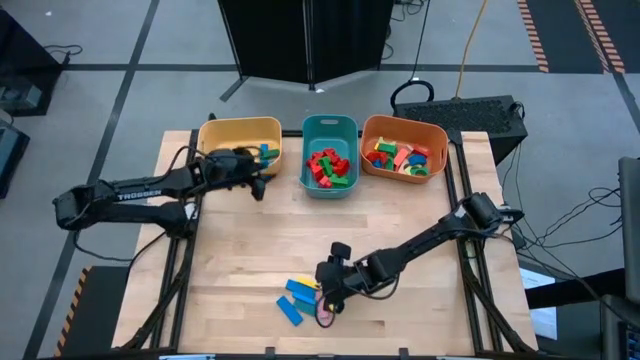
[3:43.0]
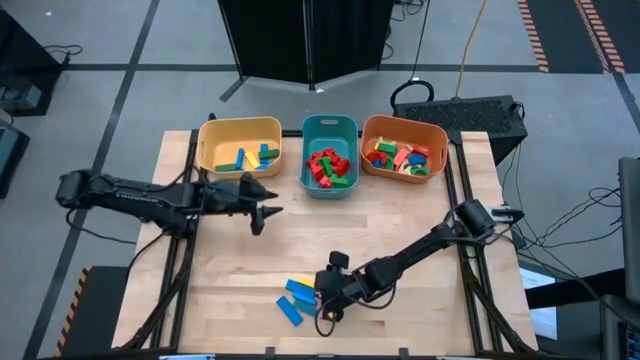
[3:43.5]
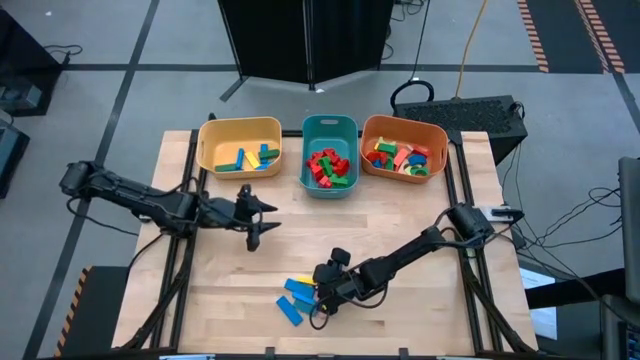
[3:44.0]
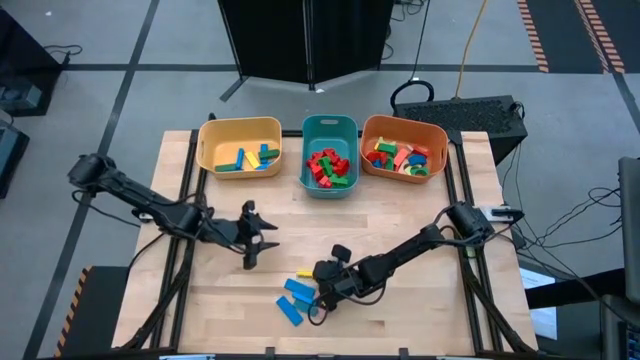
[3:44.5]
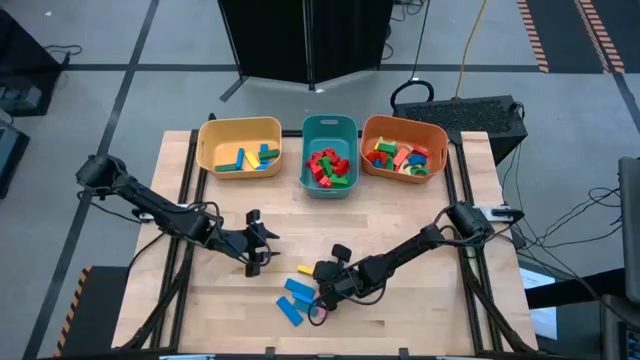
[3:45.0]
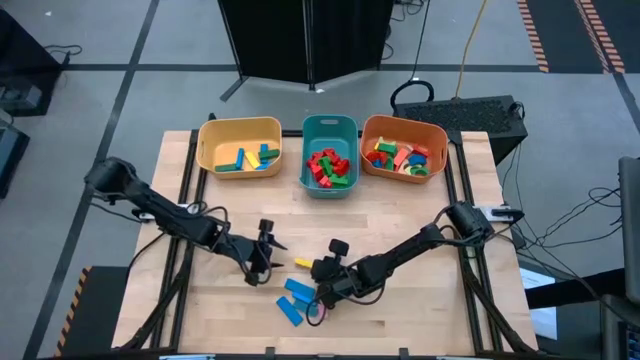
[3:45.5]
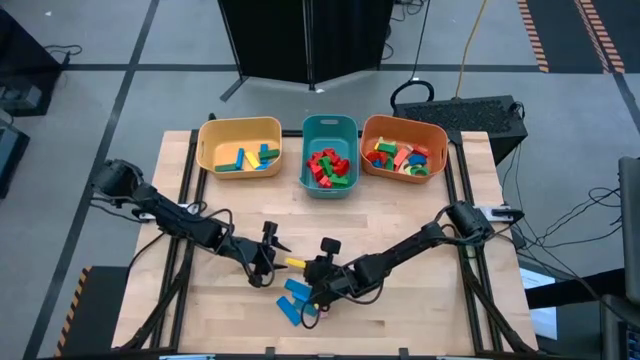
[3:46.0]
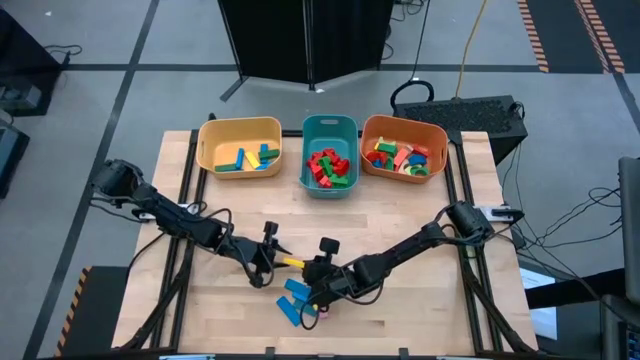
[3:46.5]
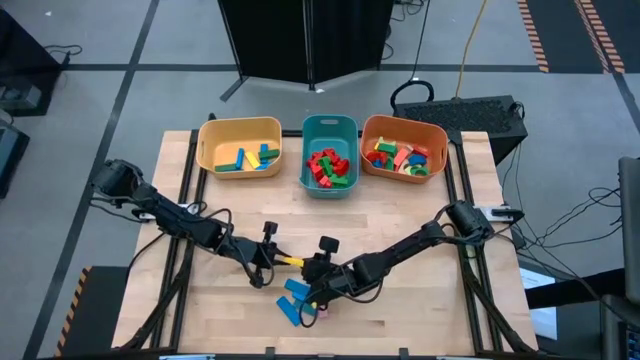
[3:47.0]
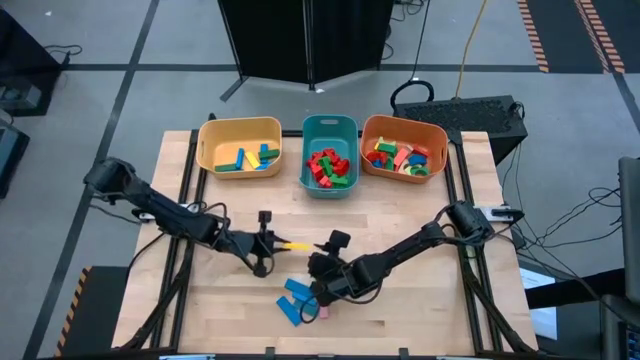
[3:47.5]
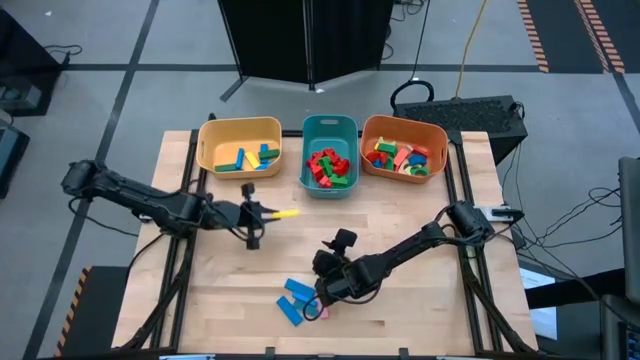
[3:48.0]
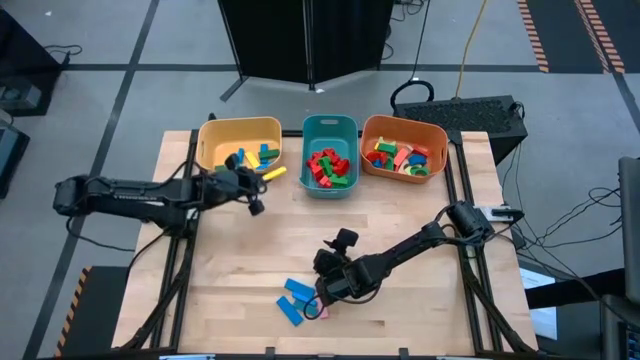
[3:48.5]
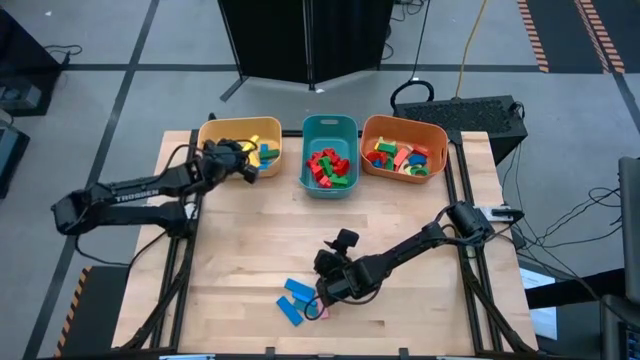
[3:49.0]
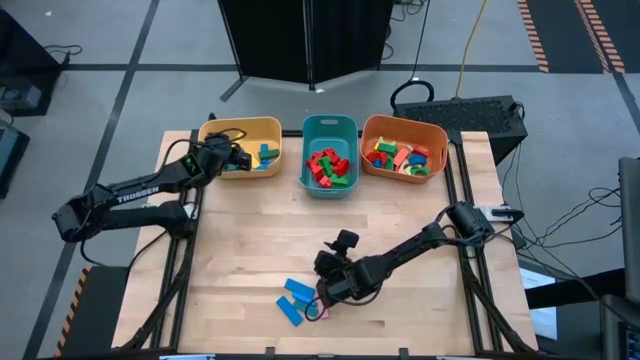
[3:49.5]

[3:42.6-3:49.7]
Task: Sort blocks by size
Put the yellow rectangle block into the yellow bin

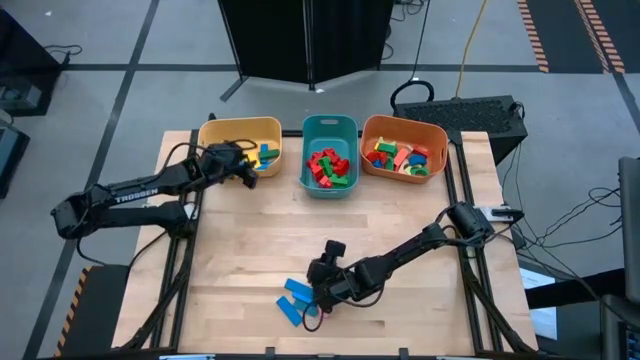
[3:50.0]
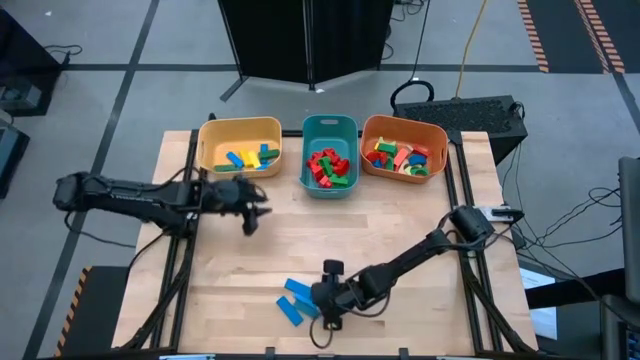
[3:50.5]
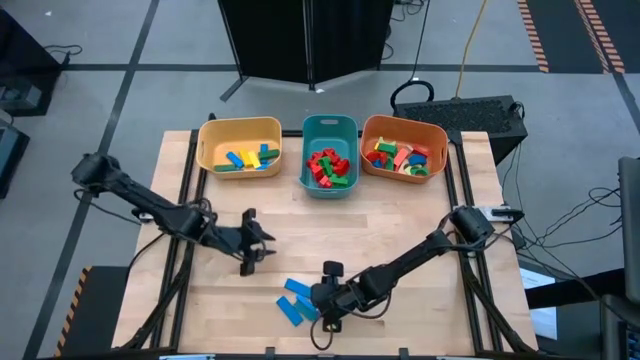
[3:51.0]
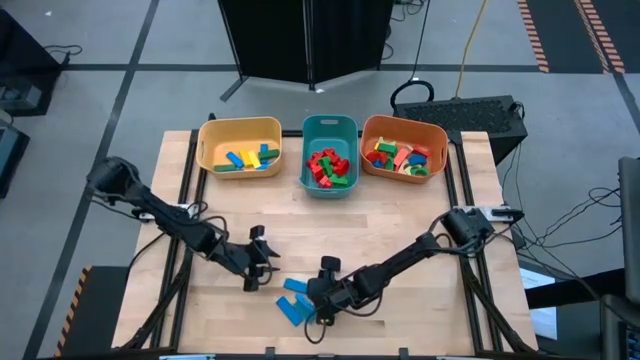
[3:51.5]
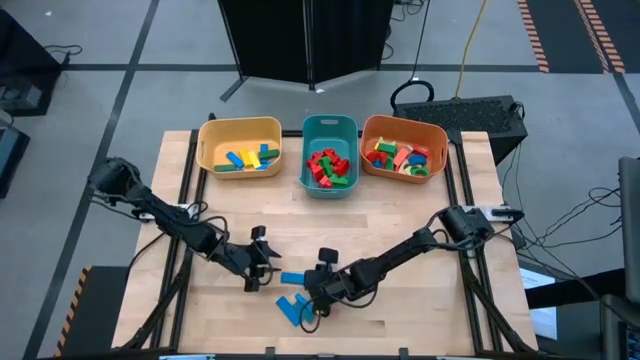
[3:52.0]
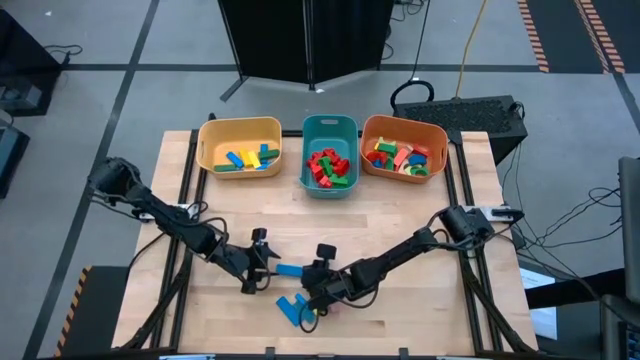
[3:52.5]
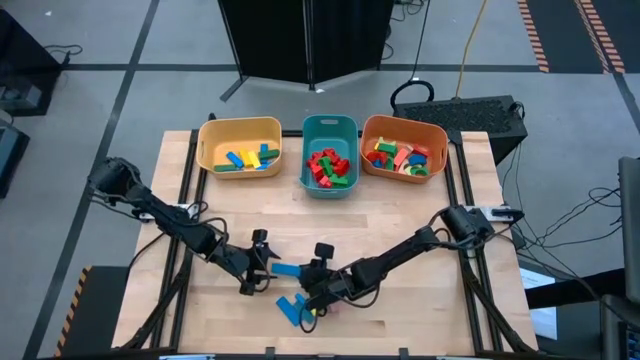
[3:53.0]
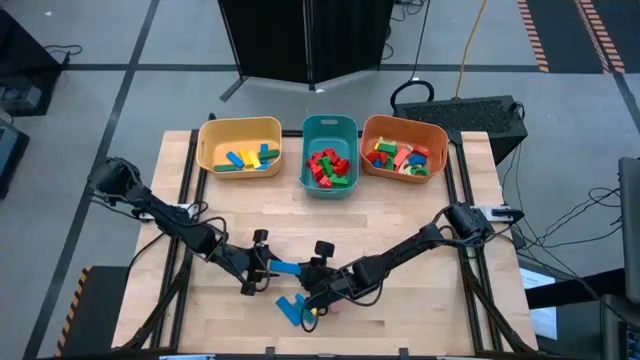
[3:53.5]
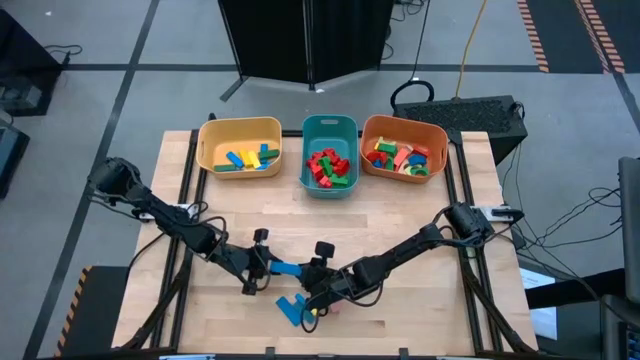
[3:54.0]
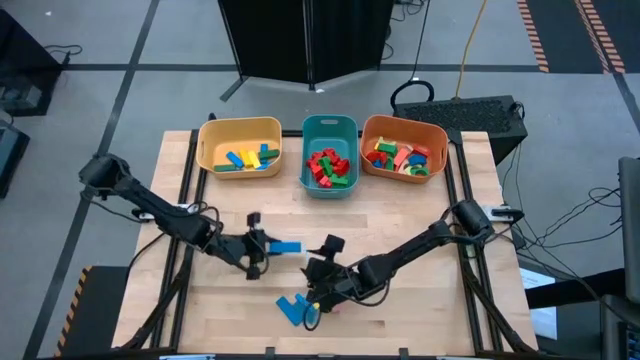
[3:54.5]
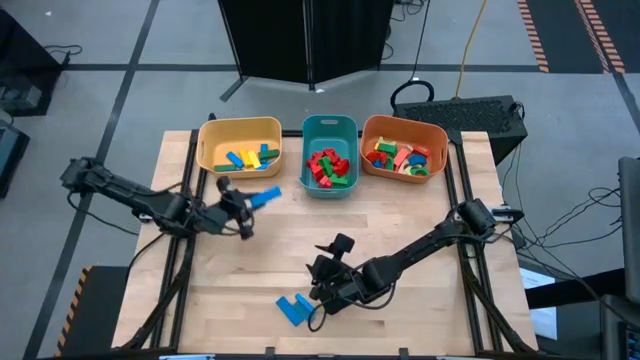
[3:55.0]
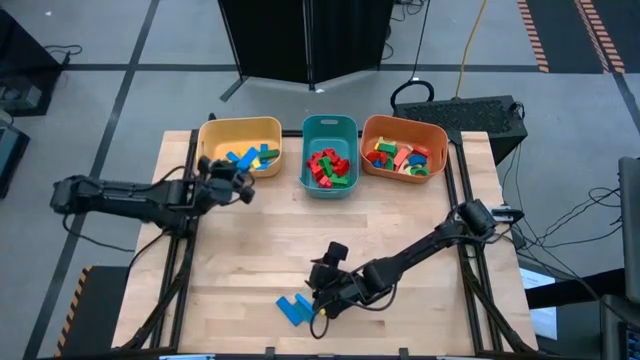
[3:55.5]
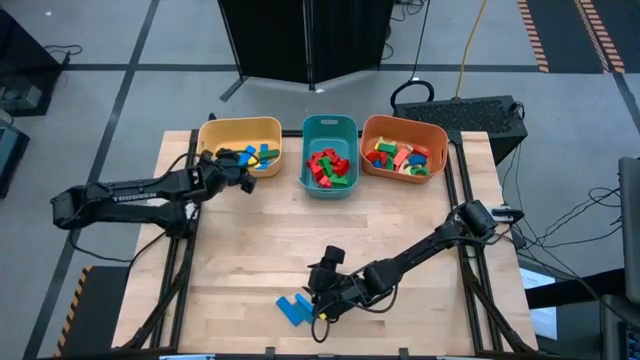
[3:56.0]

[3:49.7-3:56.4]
Put the blue rectangle block into the yellow bin

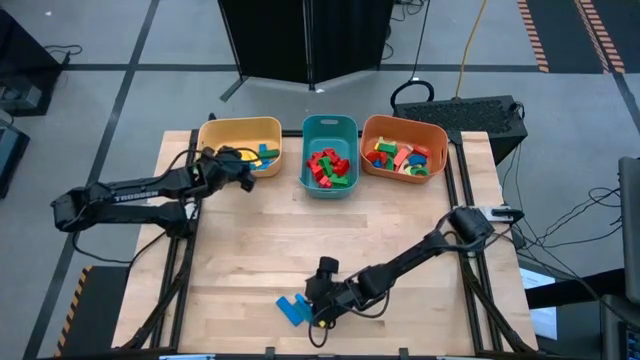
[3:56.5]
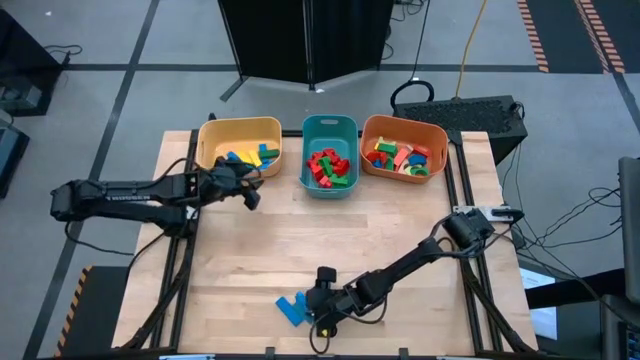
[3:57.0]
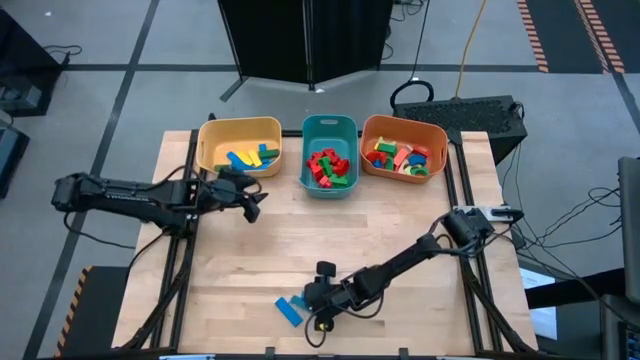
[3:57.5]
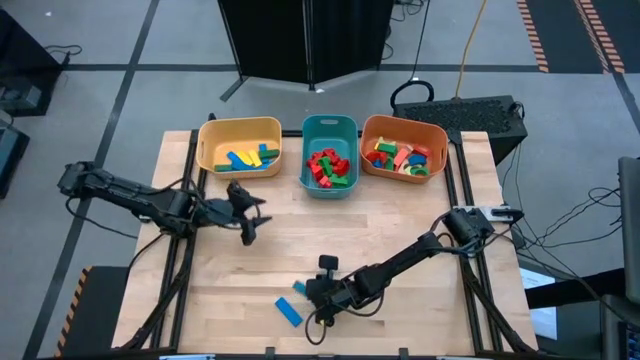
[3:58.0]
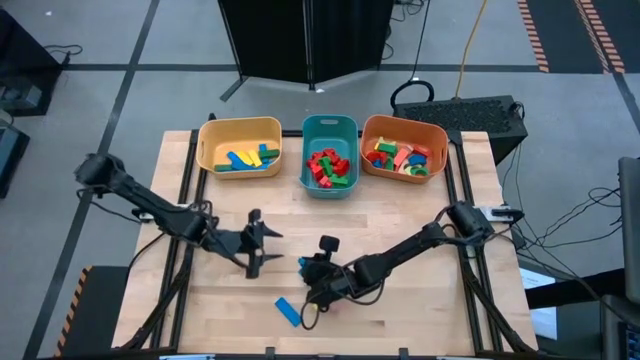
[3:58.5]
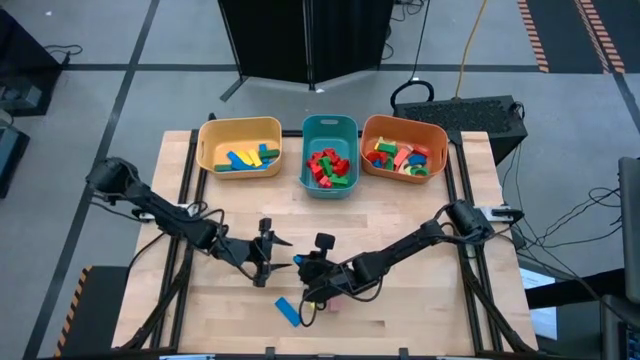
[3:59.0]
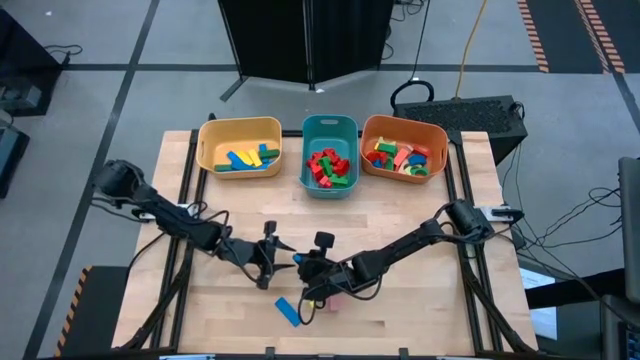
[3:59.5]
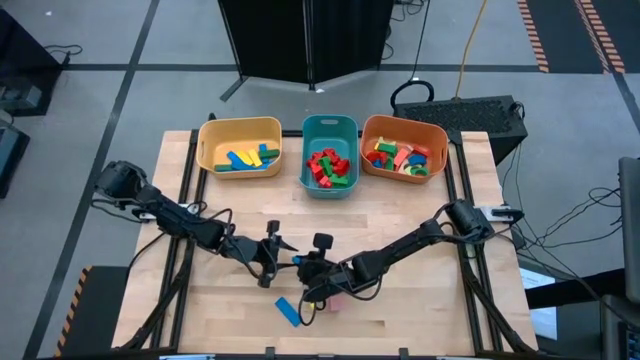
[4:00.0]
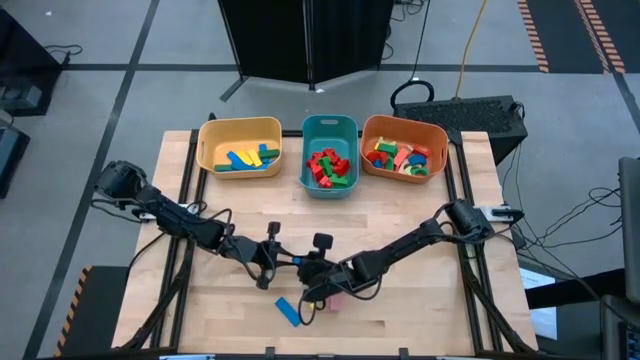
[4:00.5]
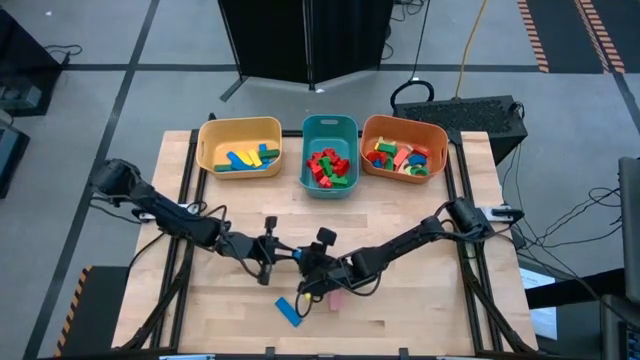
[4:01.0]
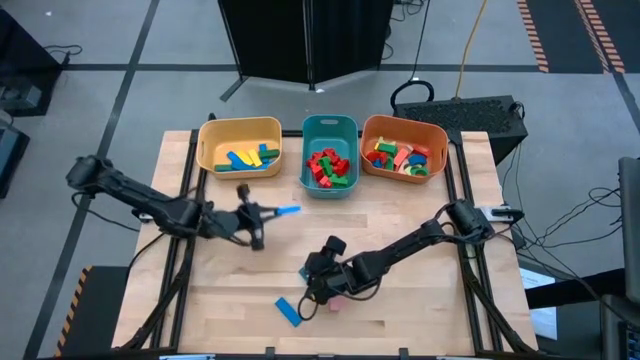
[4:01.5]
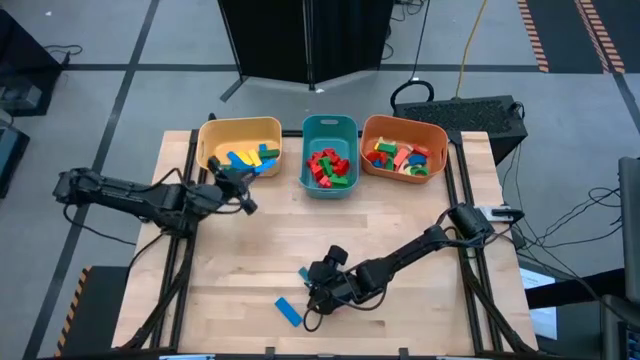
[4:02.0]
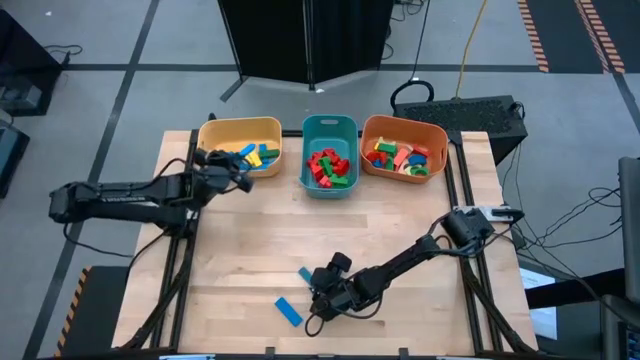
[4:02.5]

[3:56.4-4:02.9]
Put the blue rectangle block into the yellow bin

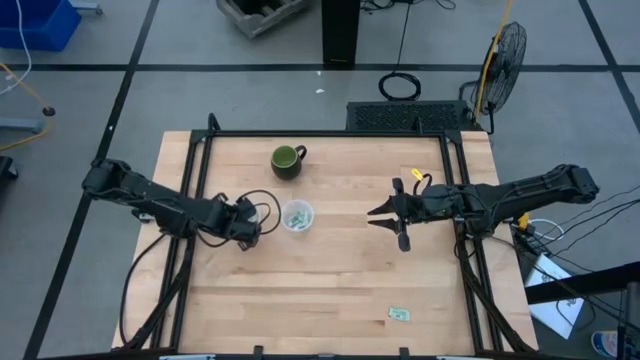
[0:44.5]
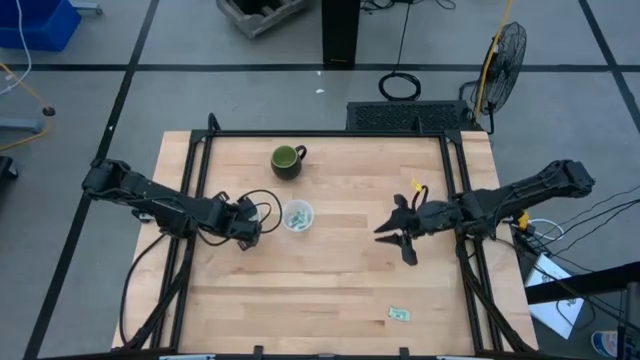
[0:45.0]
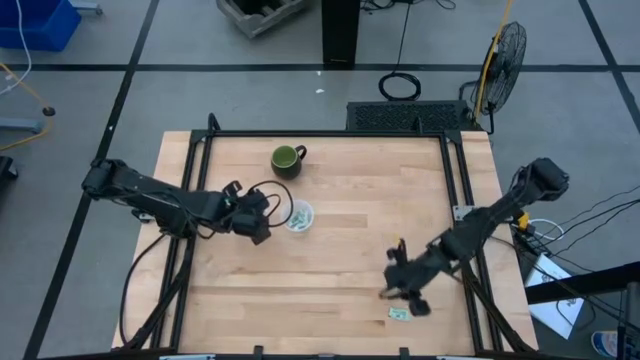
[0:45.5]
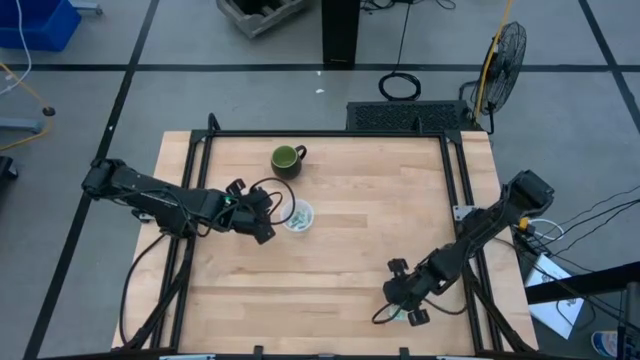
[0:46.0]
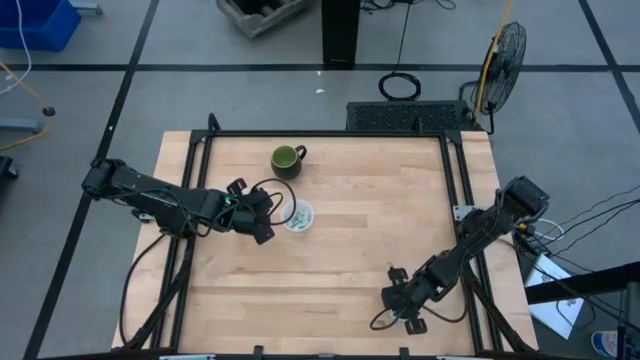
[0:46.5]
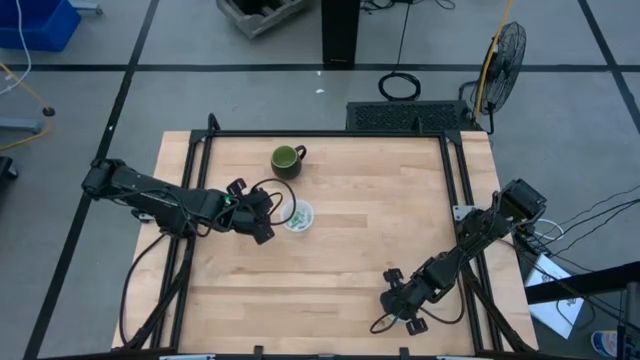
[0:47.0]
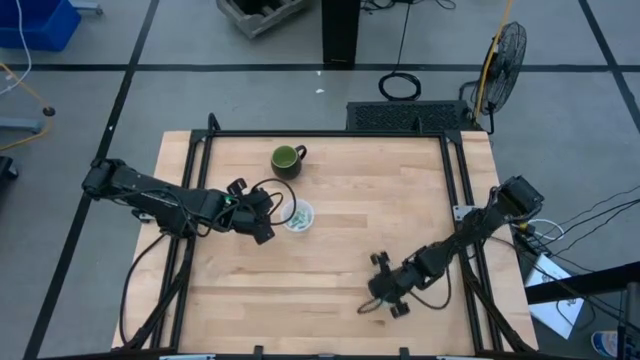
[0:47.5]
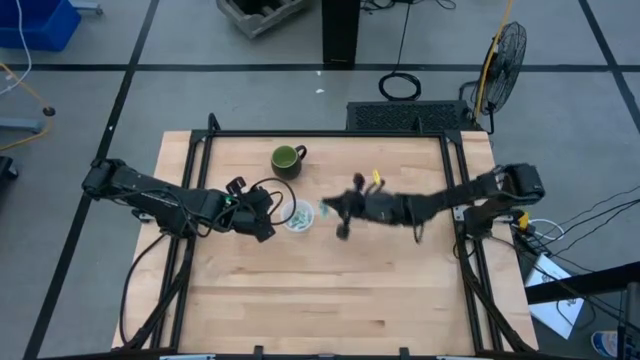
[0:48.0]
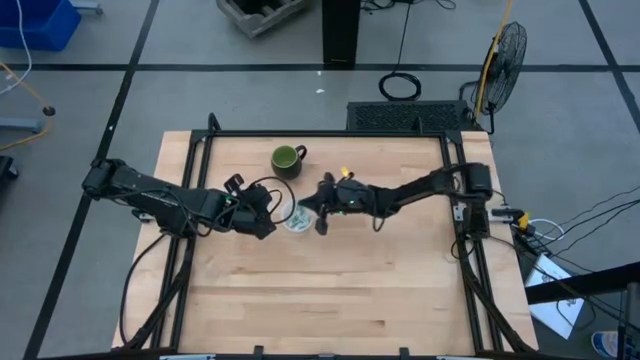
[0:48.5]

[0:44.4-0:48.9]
Task: Pick and place Stevia / Truvia into bins
Put the stevia pocket in the right plastic container
